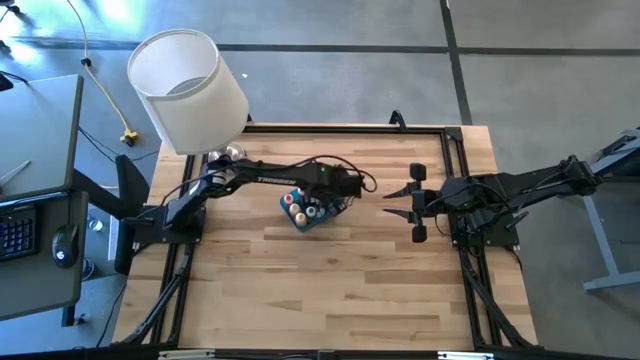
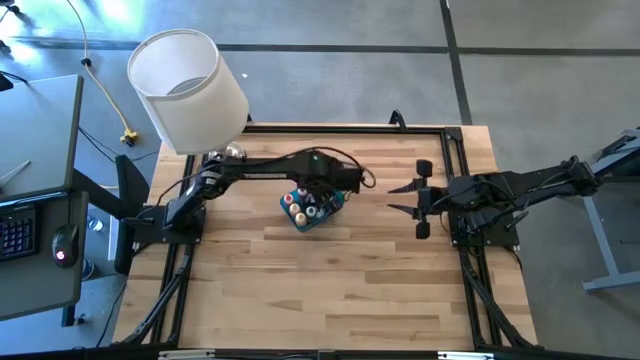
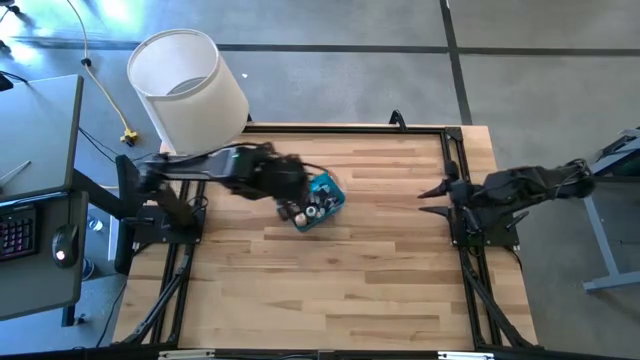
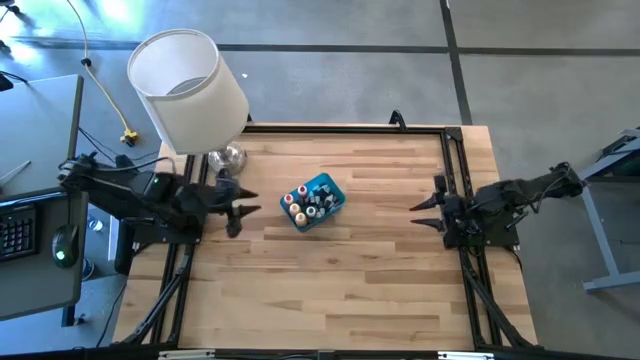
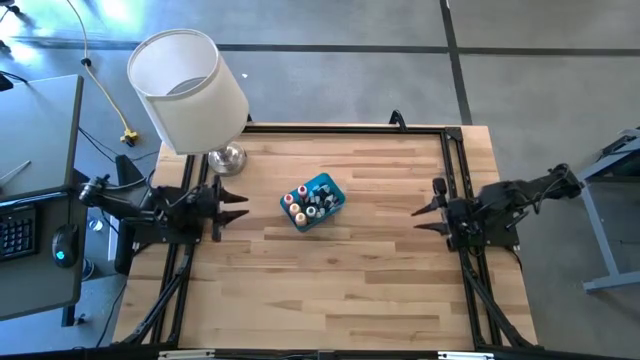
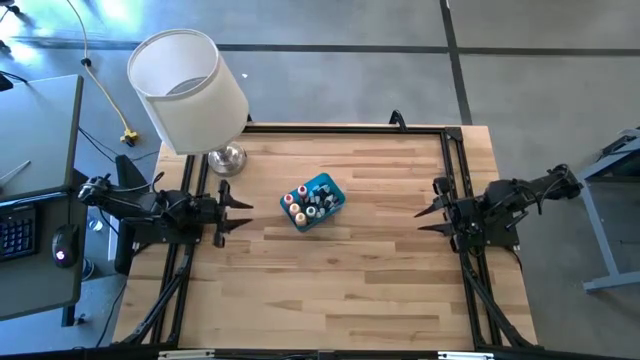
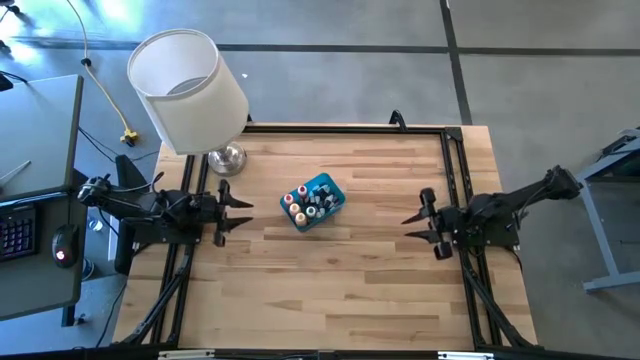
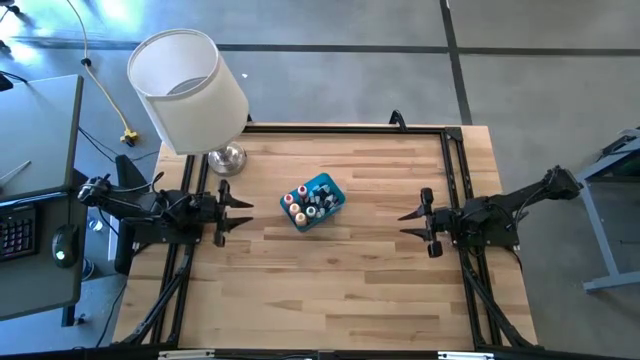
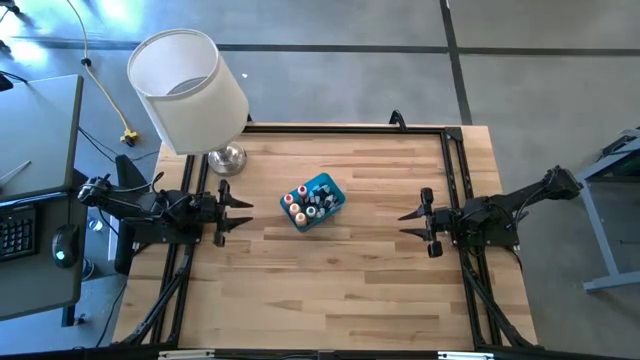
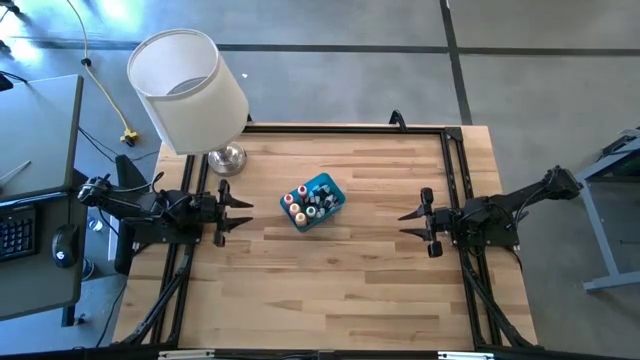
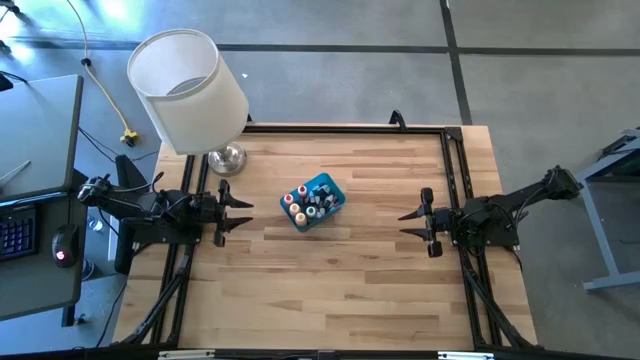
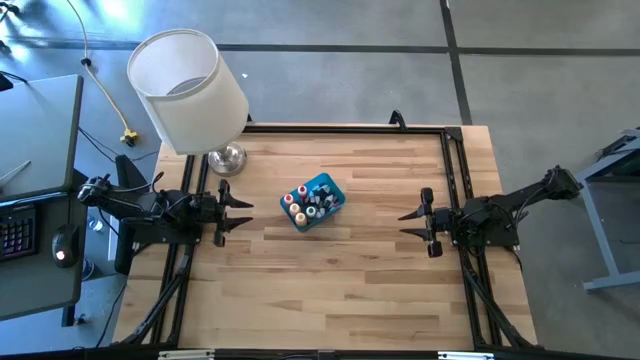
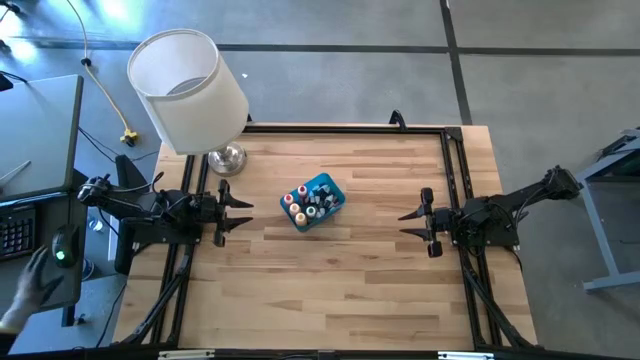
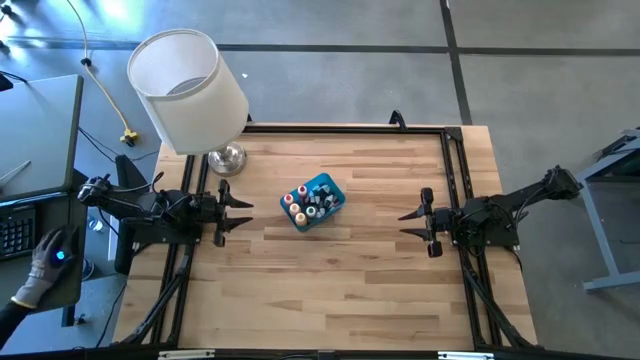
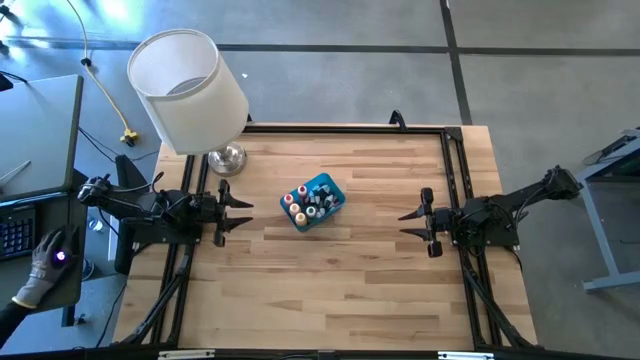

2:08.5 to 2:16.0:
Task: Pick & Place food coloring
Return to Home Position

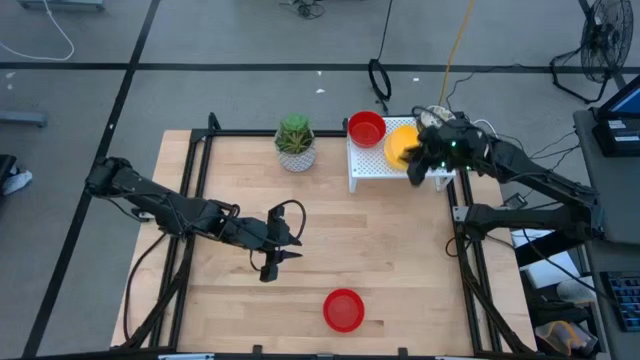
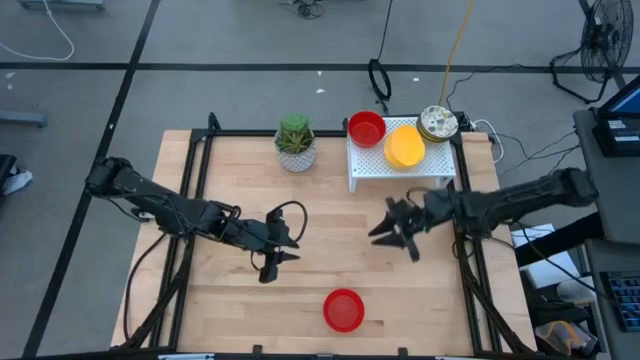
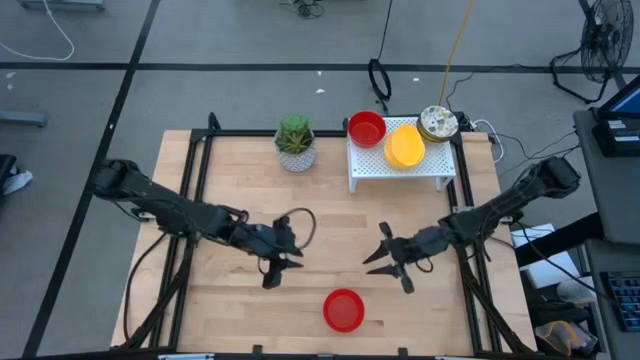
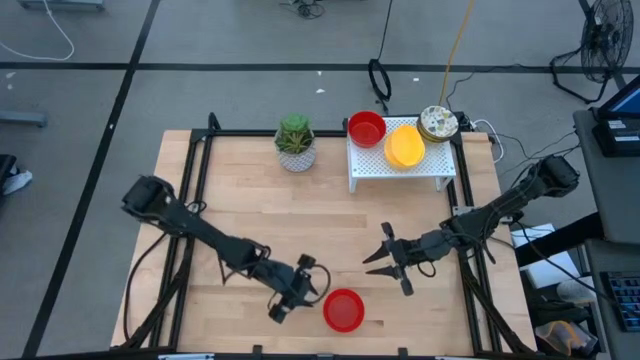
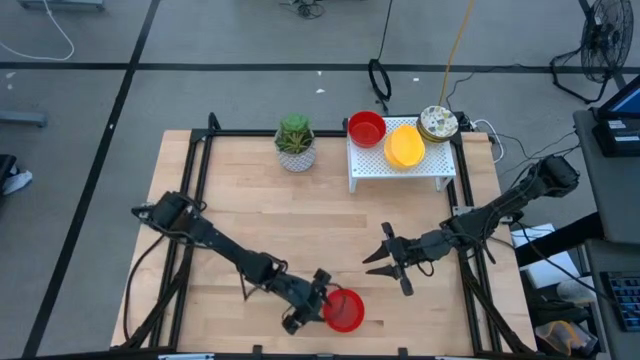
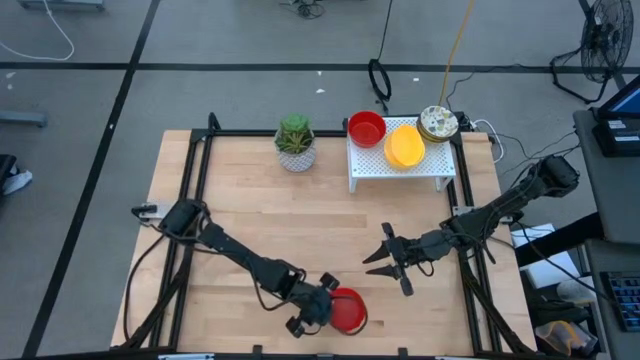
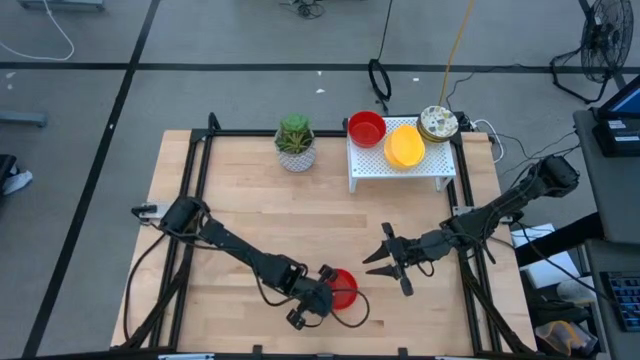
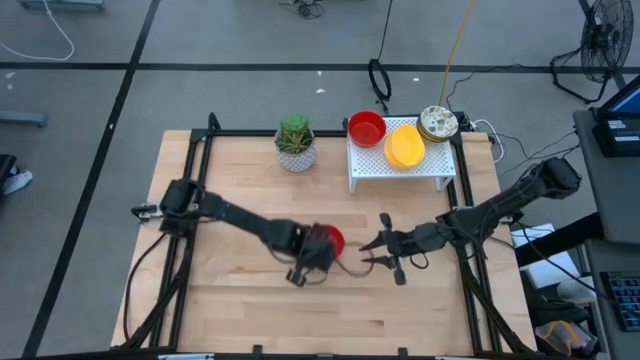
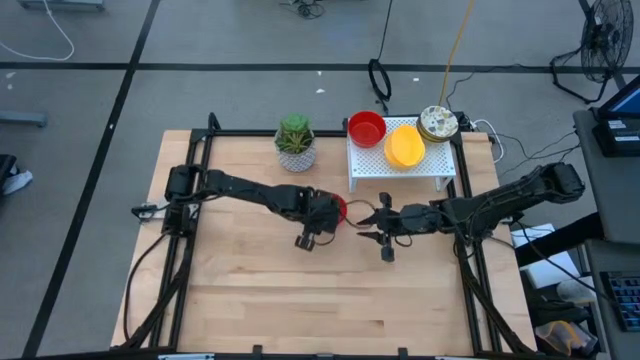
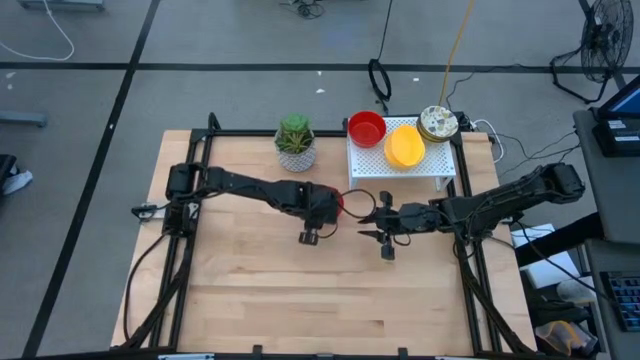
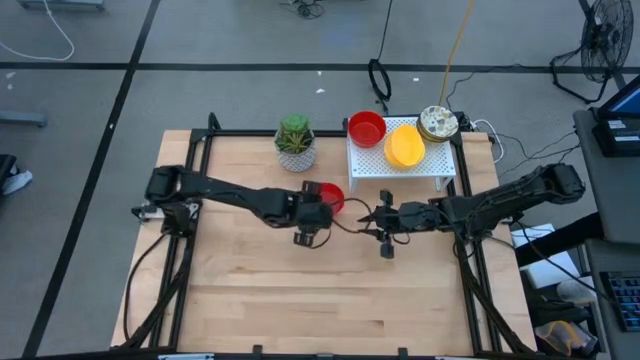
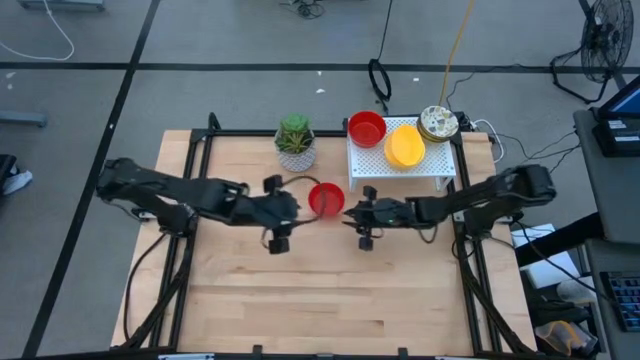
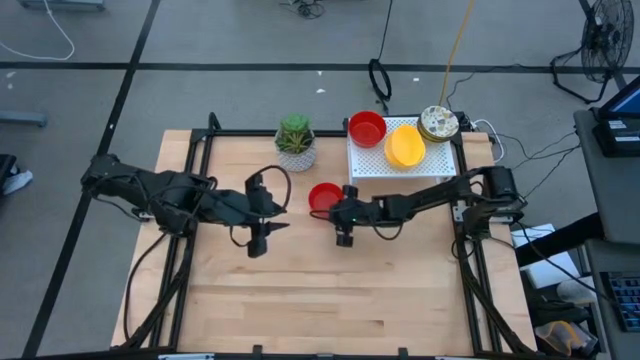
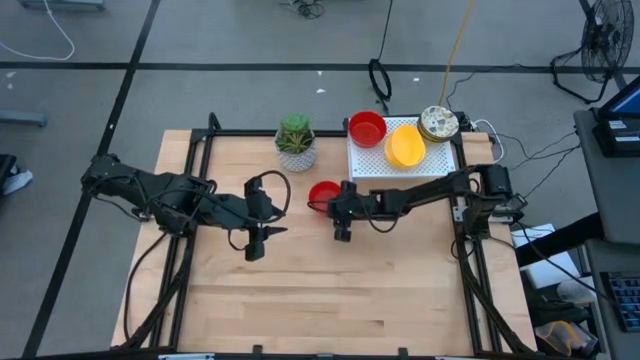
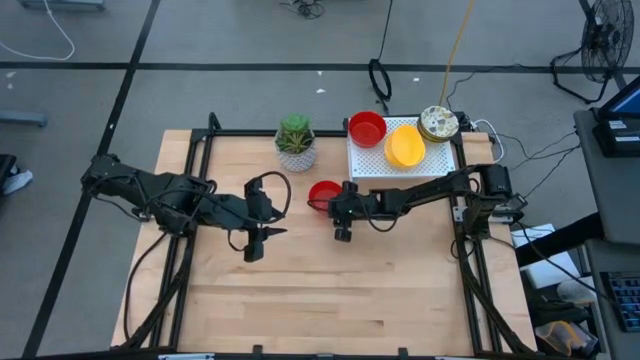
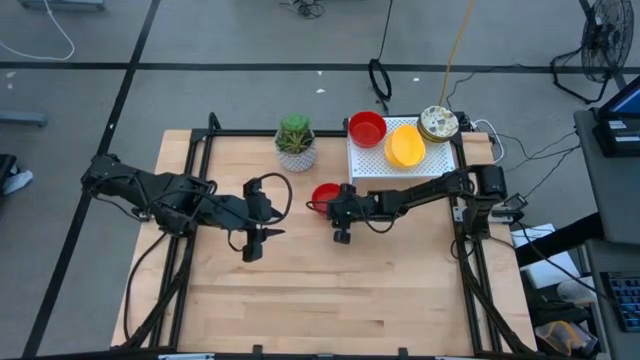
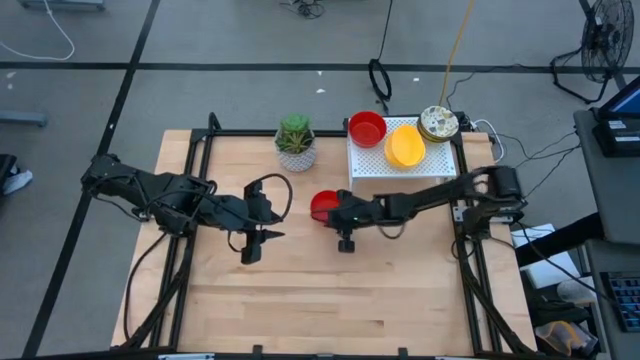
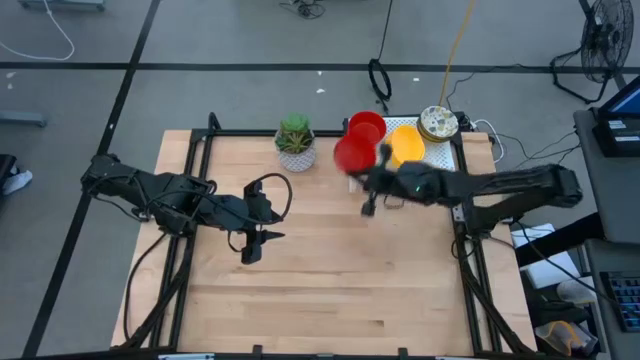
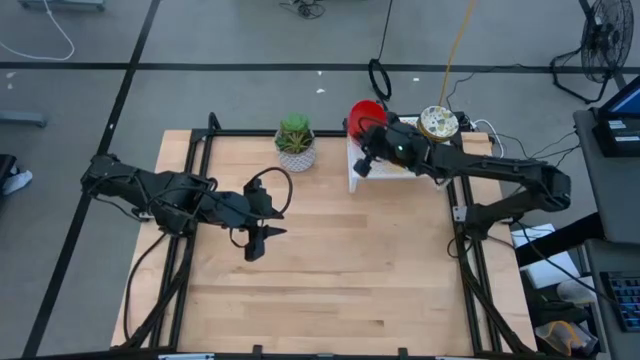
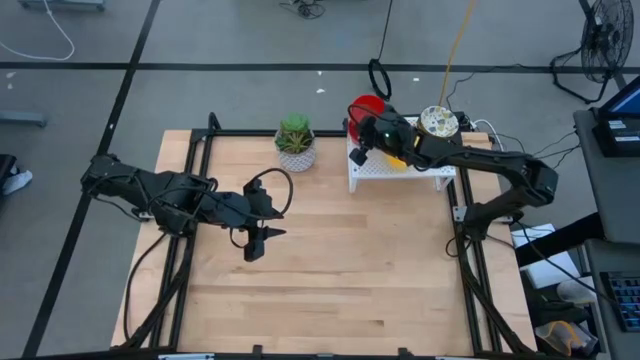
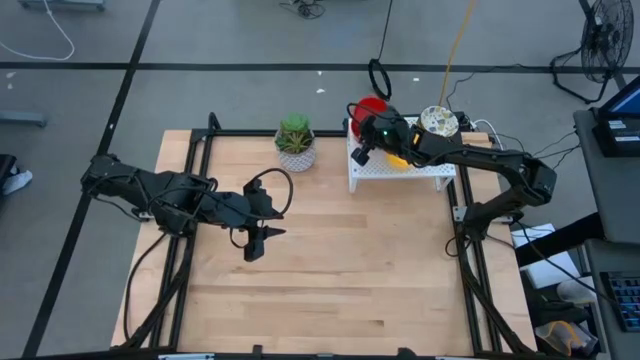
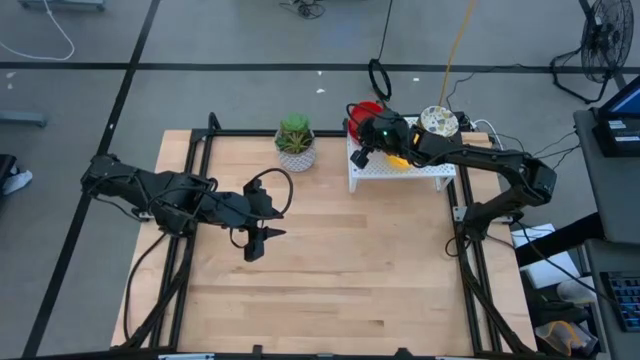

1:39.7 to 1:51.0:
Task: Pick & Place Mini bowls
Stack the red bowl on top of the other red bowls on the shelf
